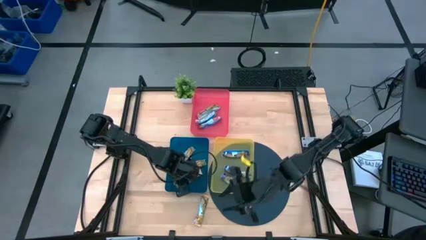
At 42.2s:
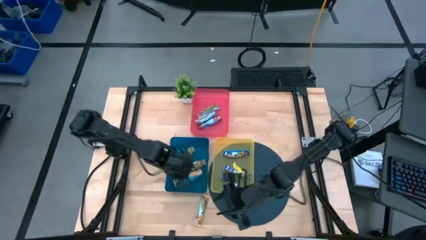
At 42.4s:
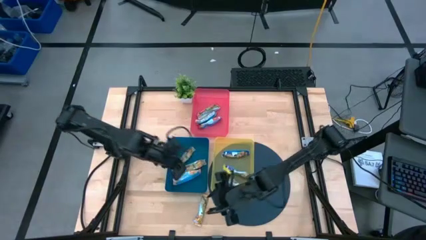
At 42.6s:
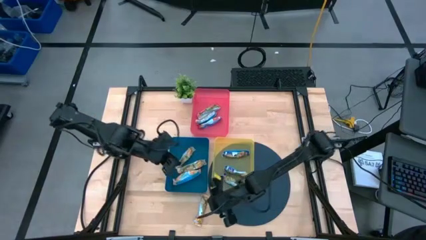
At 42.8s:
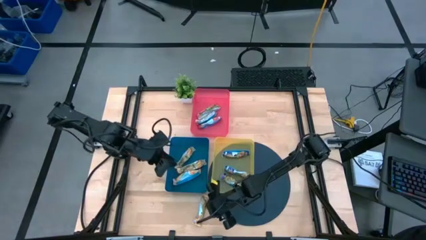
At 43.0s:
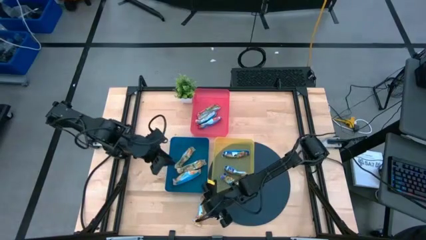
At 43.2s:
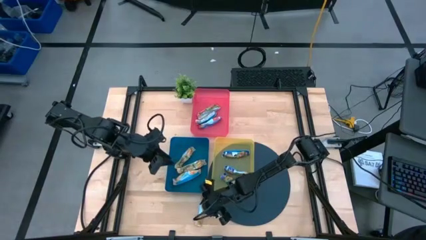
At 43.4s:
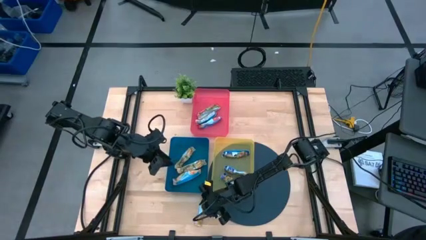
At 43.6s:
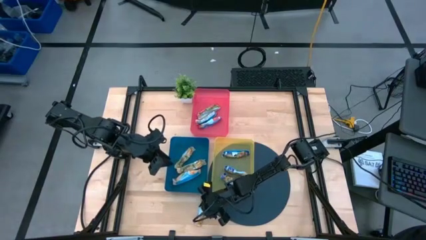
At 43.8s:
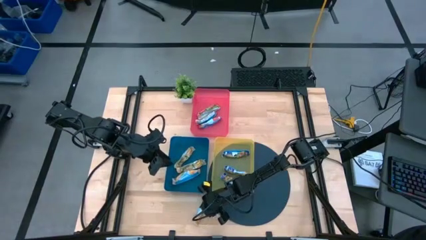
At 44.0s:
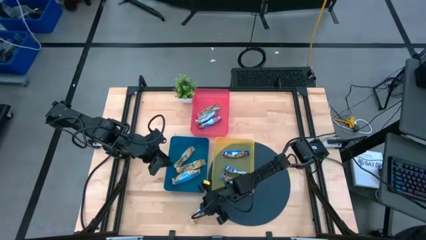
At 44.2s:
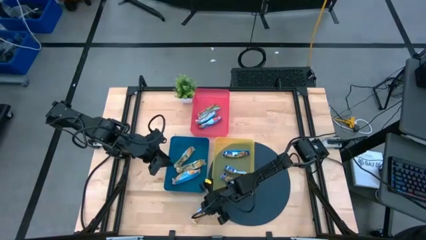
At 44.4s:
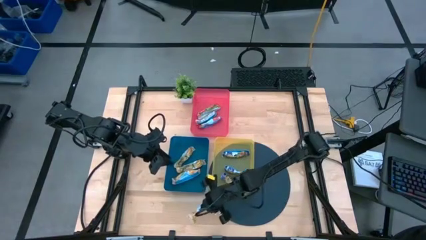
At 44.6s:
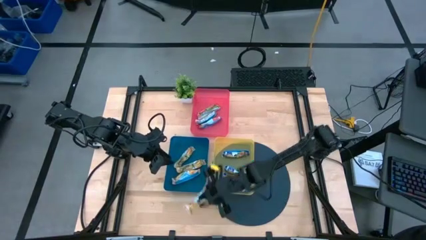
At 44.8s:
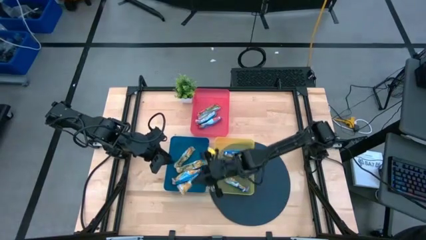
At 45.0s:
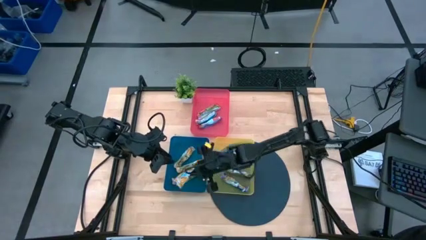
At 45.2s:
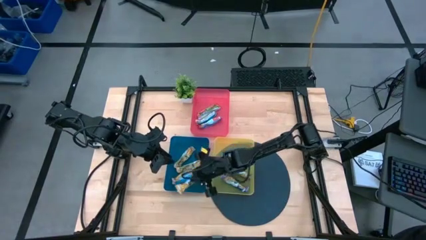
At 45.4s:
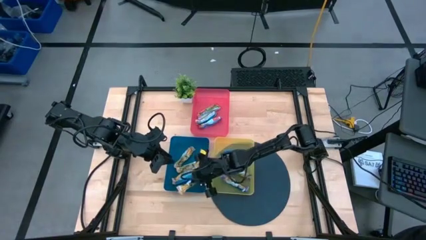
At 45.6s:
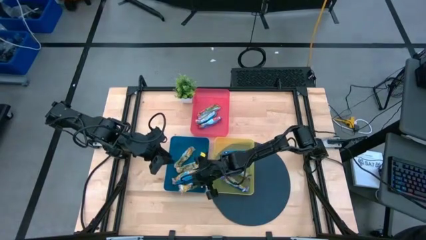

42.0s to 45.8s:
Task: Pick and place Granola Bars by type
Put the yellow granola bar into the blue bin

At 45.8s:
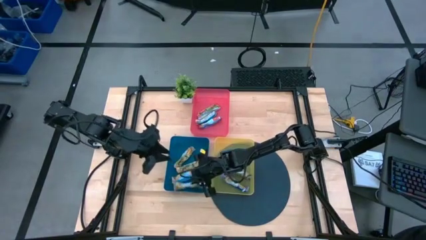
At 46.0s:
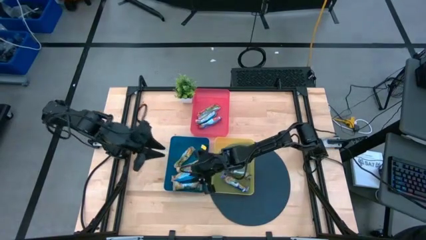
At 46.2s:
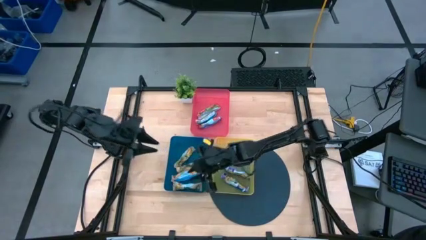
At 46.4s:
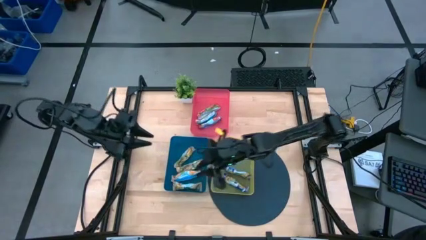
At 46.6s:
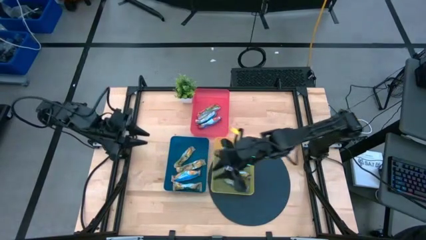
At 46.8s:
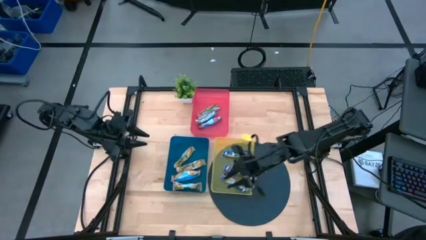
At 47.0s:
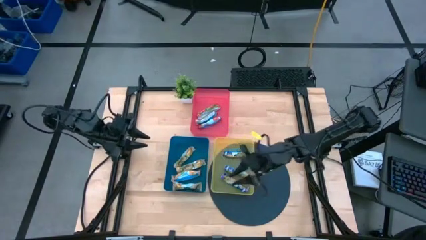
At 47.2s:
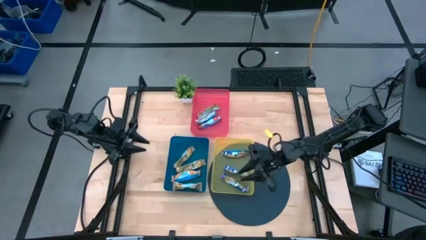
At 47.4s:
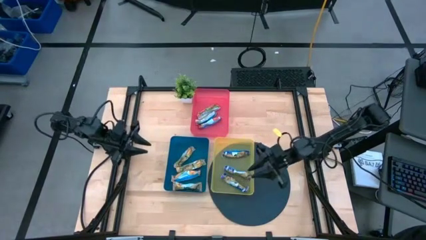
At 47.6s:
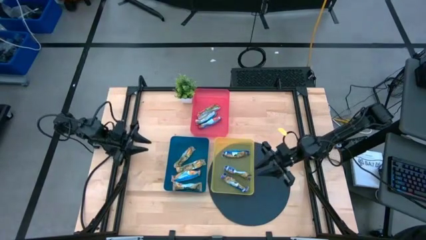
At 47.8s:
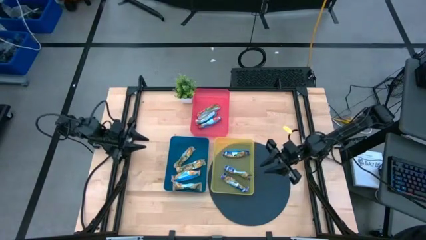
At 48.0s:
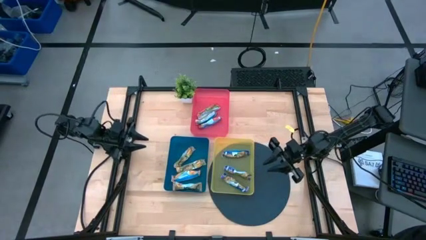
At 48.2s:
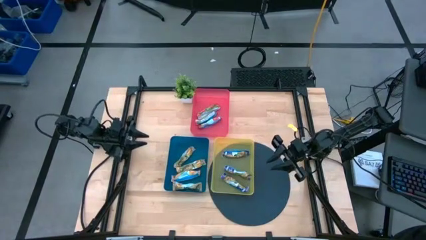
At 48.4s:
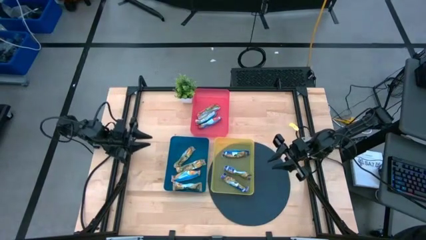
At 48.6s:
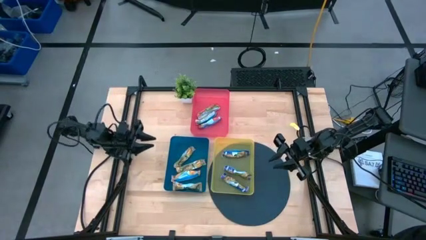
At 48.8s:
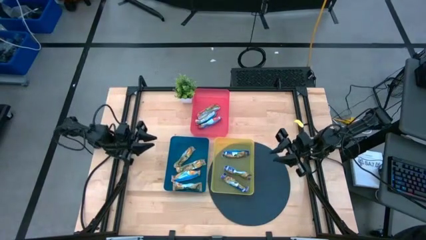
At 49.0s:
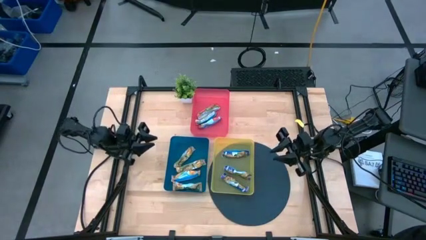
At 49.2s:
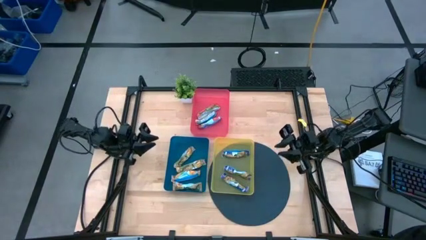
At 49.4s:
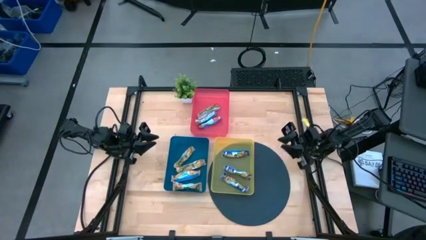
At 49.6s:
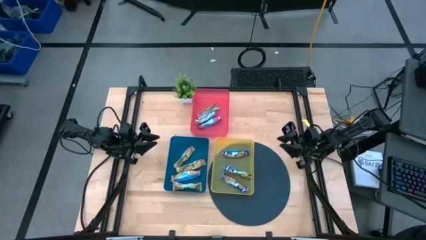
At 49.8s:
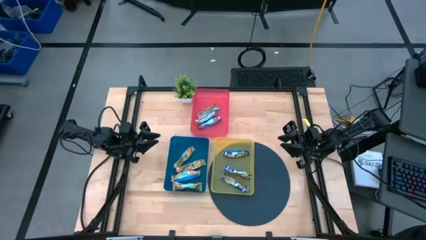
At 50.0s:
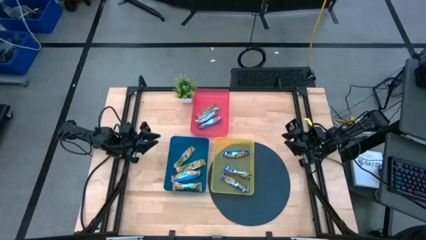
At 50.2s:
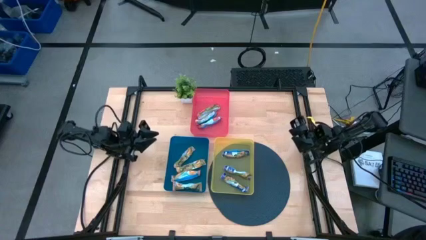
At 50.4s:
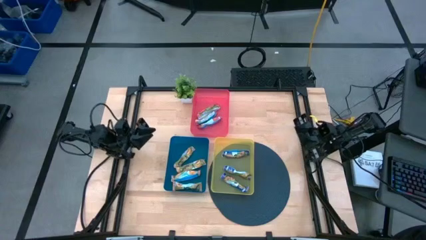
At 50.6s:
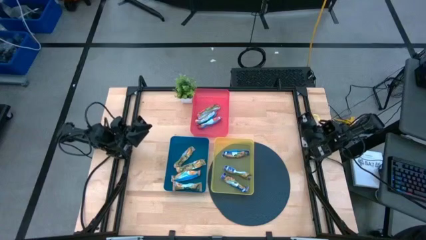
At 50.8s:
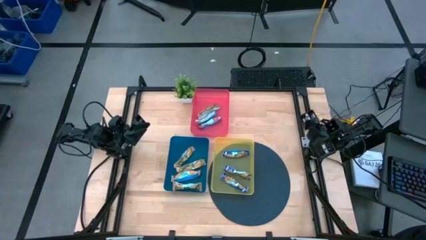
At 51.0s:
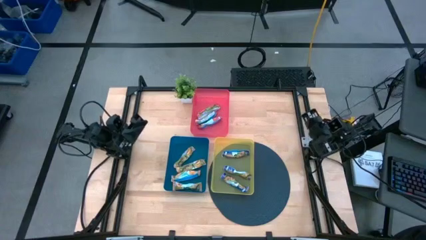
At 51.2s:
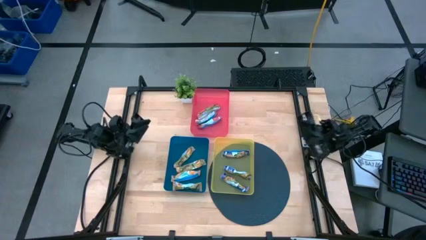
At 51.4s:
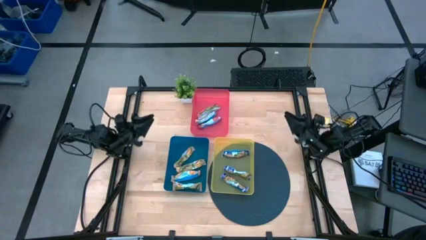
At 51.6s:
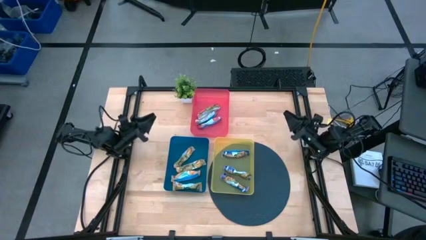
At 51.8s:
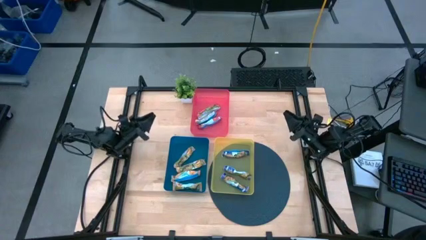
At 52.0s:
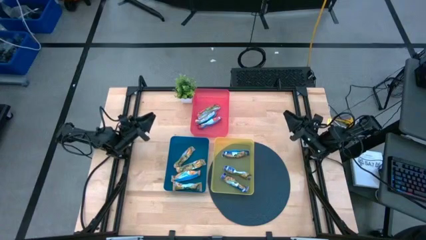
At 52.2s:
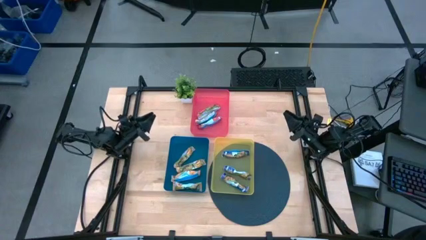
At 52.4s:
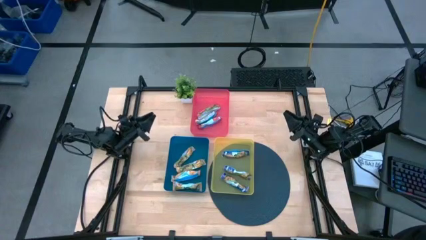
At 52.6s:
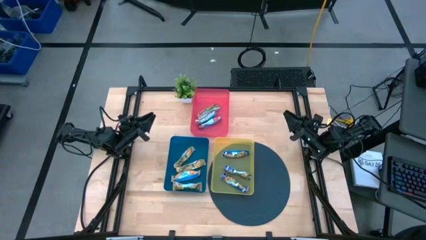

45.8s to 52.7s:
Return to Home Position

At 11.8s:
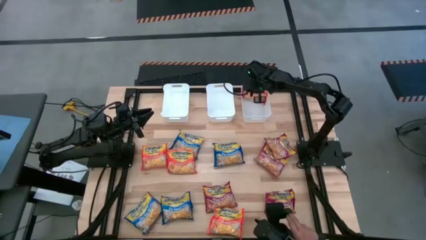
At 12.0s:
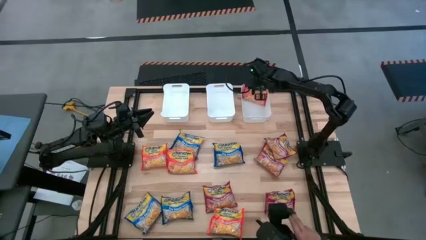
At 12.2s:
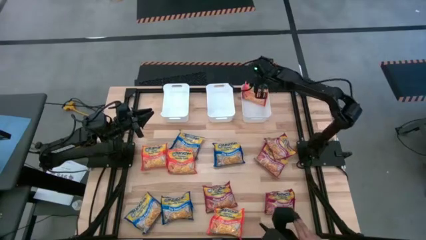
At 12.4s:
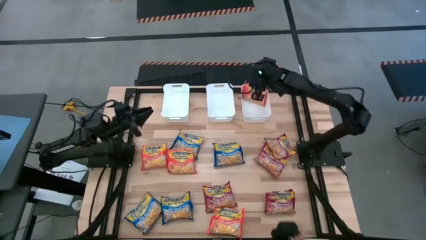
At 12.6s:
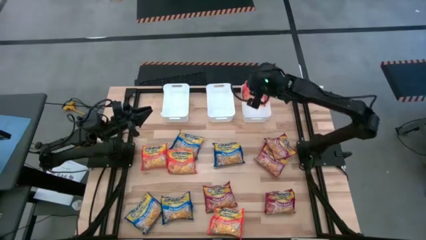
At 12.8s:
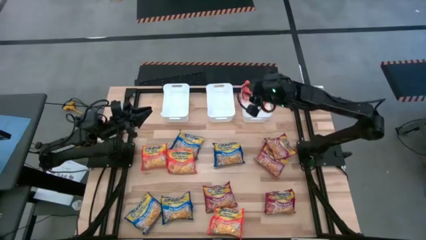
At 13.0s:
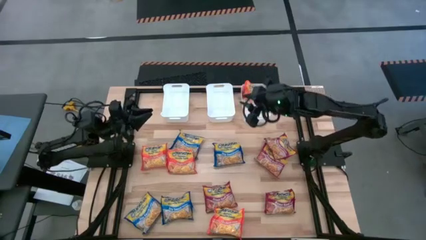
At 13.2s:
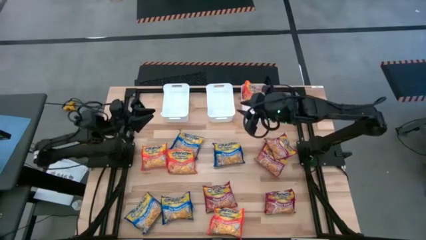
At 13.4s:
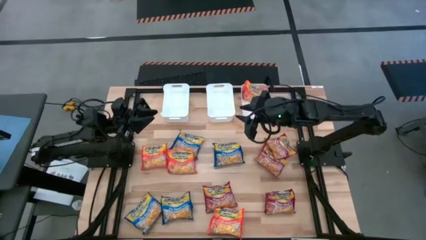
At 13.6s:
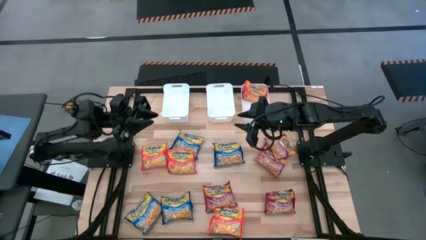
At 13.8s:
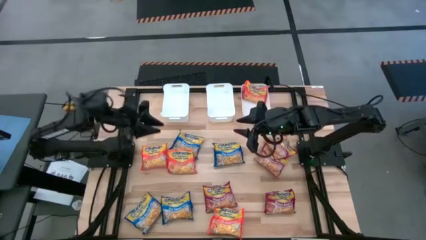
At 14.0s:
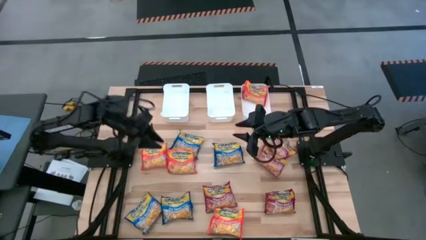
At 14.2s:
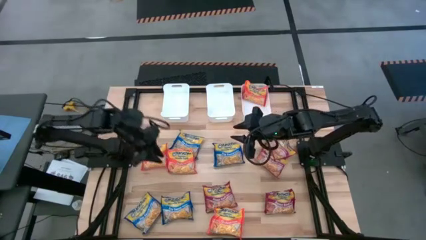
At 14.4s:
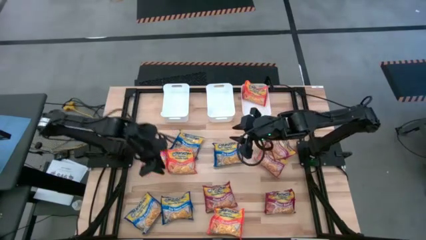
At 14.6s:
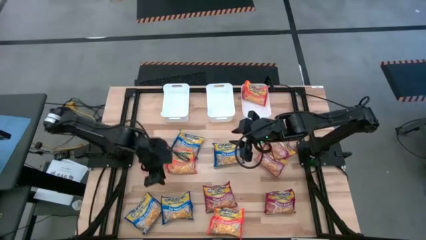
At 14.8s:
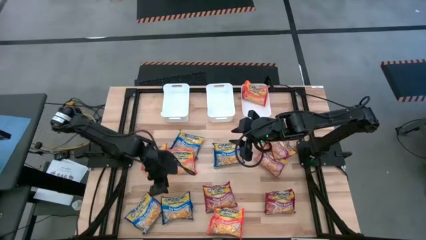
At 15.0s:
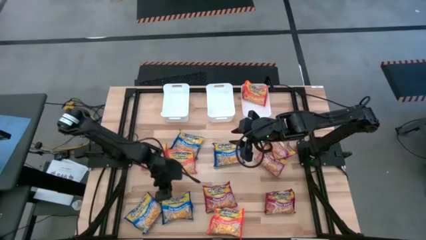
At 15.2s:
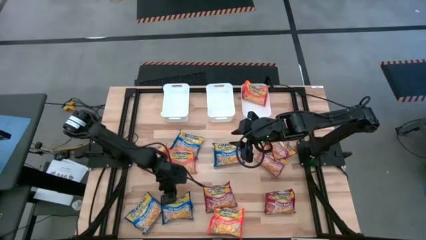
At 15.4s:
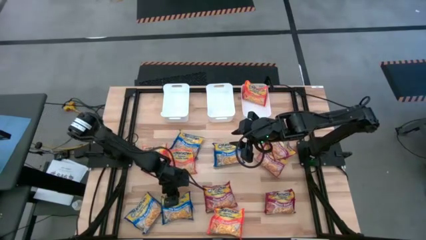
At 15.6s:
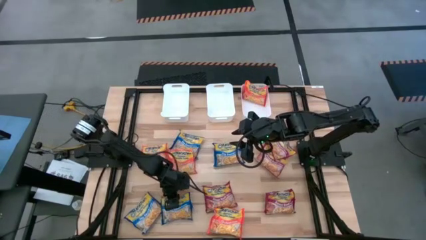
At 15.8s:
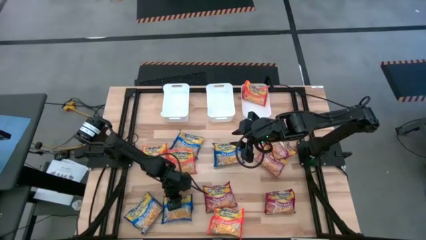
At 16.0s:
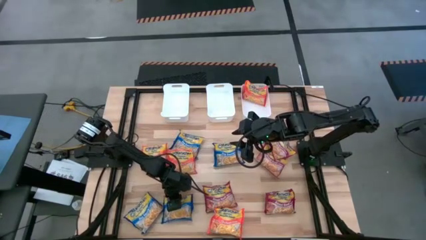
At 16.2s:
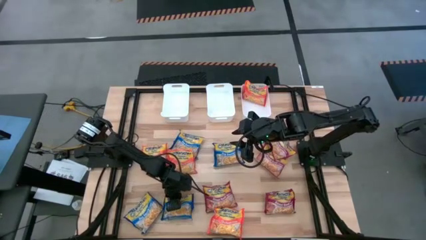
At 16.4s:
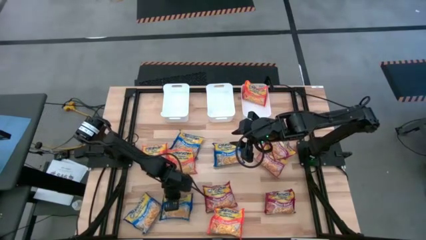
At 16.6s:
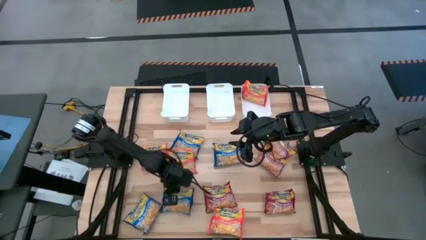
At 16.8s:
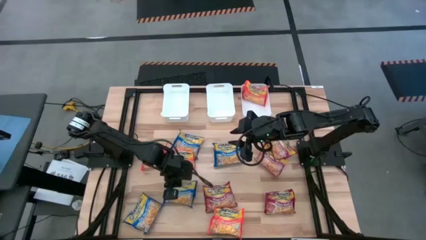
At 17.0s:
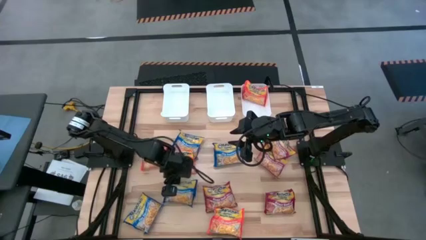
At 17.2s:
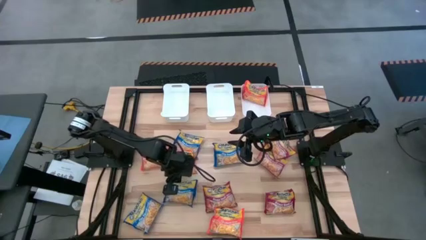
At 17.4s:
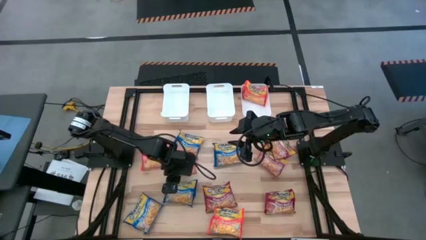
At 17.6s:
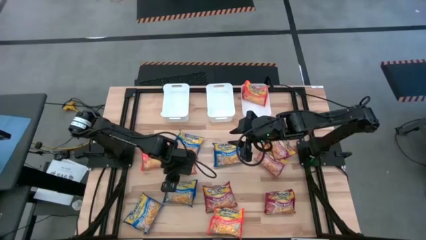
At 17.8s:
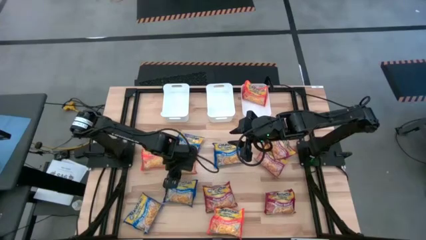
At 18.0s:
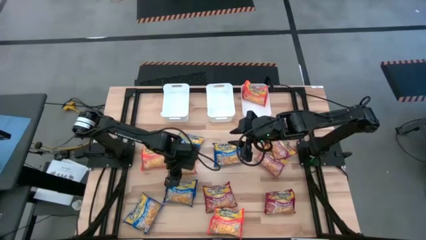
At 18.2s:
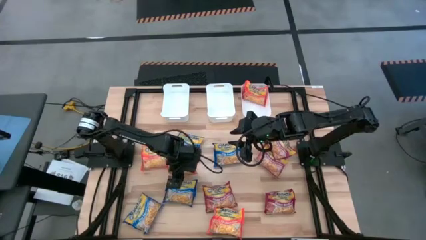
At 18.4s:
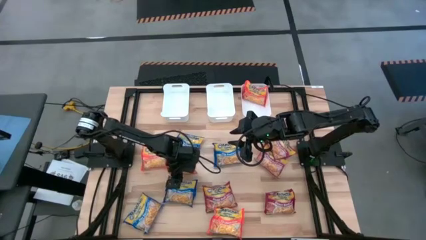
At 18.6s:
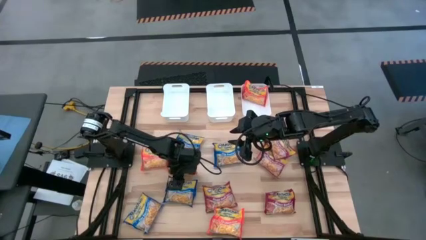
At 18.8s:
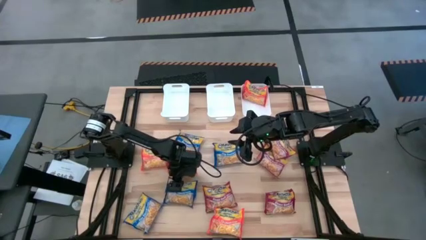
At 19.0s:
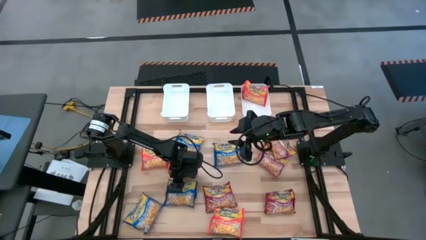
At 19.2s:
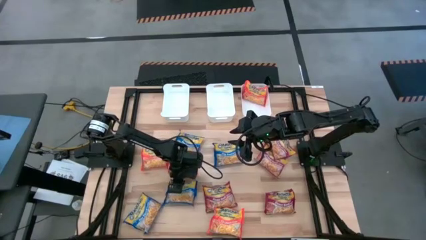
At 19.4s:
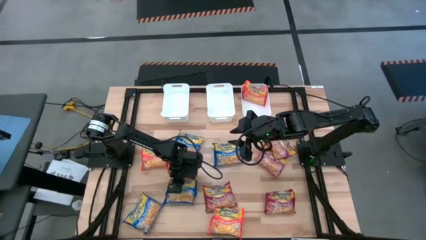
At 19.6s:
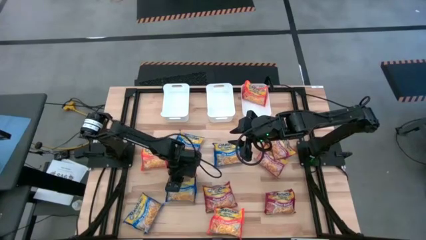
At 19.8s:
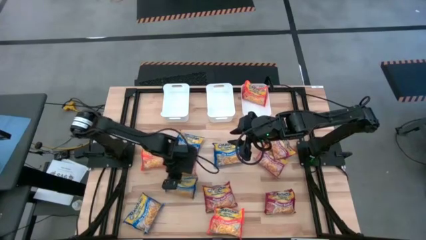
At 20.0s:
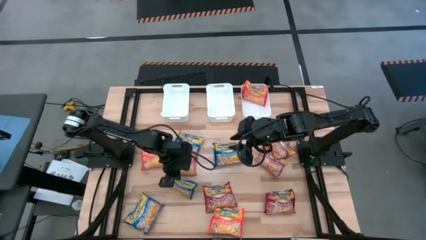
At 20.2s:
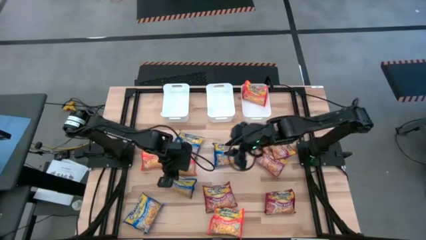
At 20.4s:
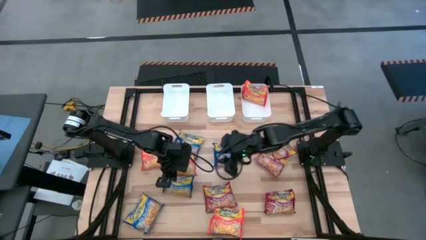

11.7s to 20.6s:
Task: Sort Maruchan noodles
Put the bottom blue noodle pack into the top middle white bin
